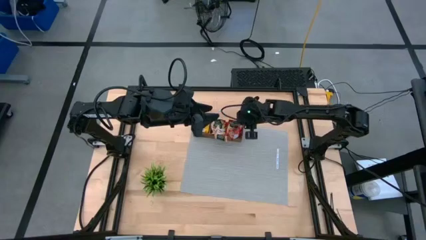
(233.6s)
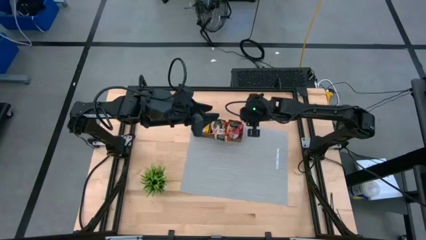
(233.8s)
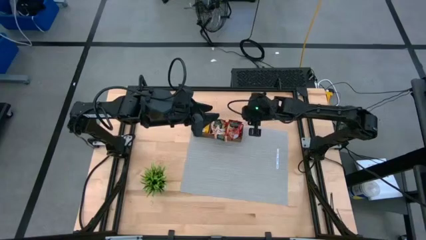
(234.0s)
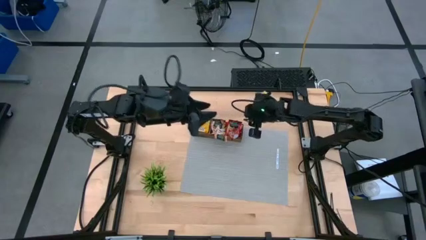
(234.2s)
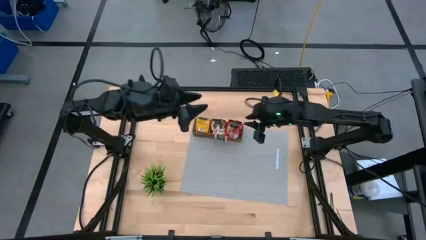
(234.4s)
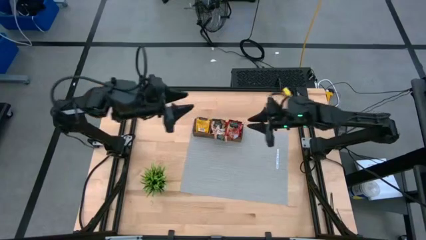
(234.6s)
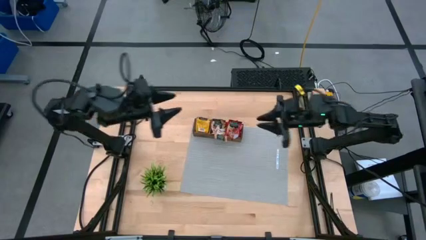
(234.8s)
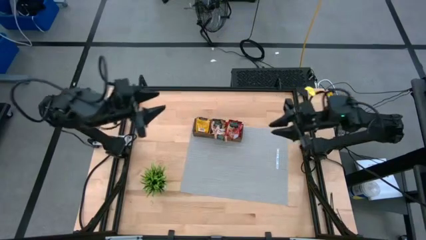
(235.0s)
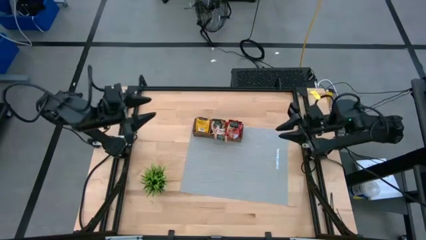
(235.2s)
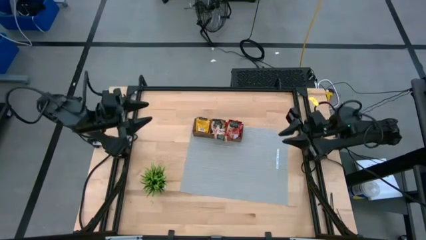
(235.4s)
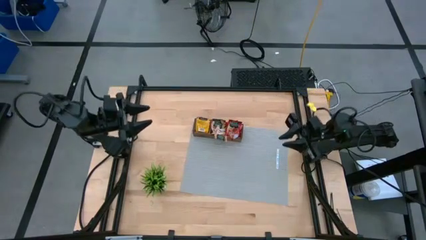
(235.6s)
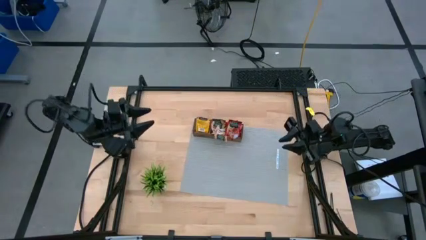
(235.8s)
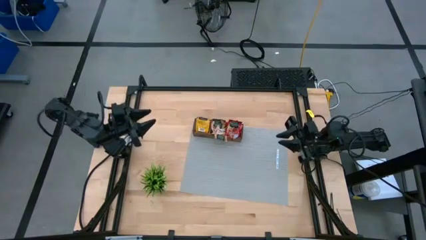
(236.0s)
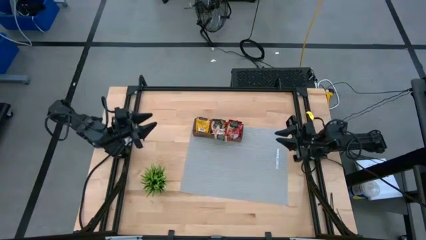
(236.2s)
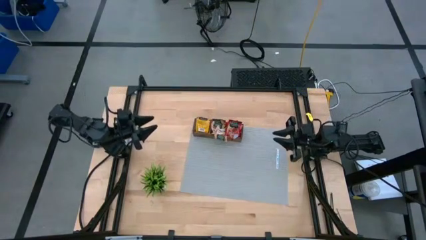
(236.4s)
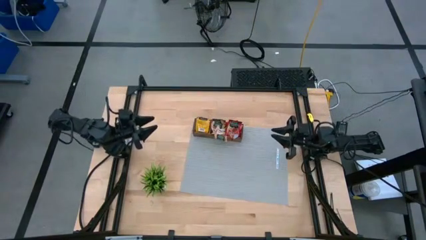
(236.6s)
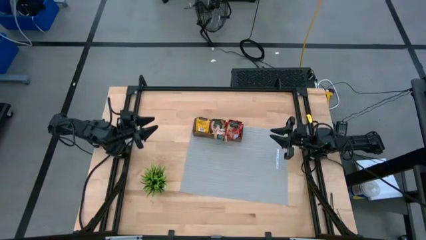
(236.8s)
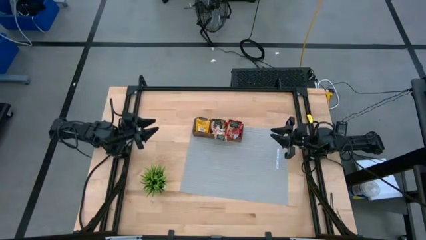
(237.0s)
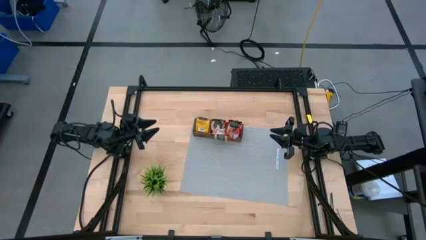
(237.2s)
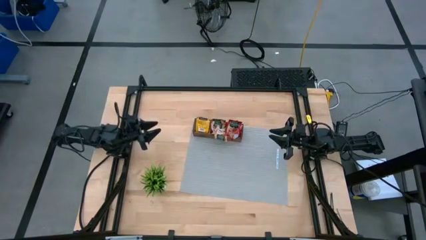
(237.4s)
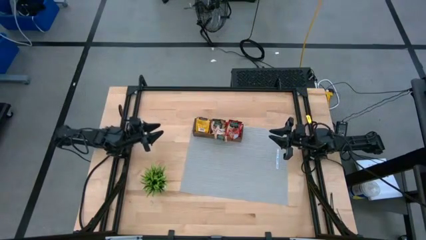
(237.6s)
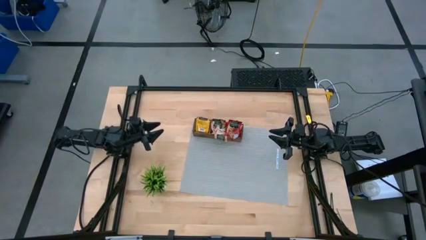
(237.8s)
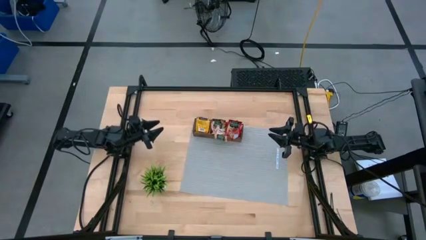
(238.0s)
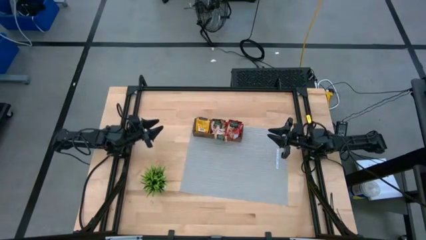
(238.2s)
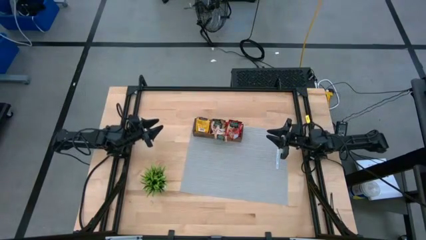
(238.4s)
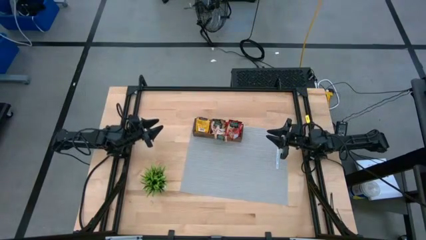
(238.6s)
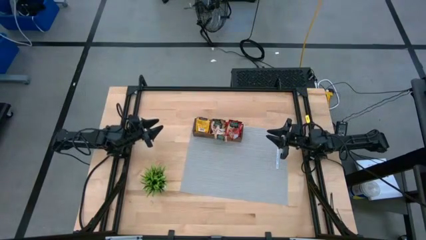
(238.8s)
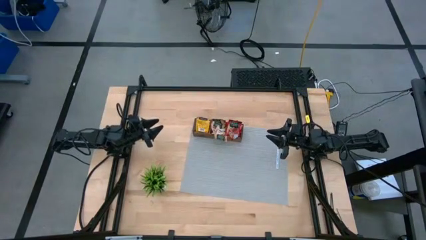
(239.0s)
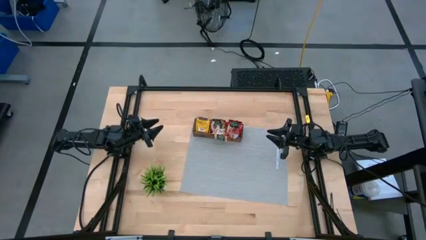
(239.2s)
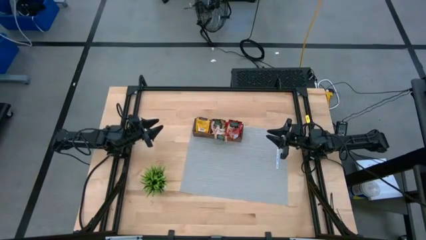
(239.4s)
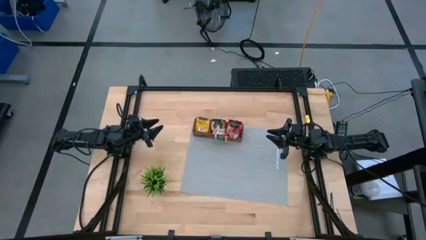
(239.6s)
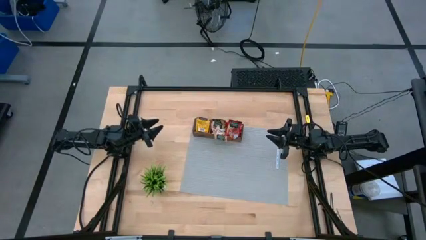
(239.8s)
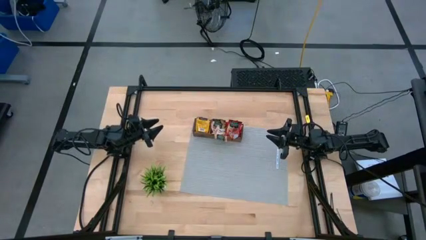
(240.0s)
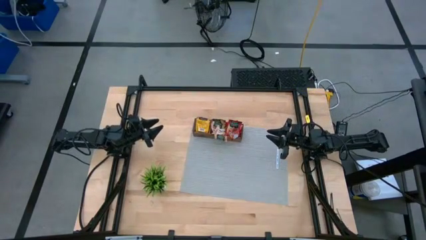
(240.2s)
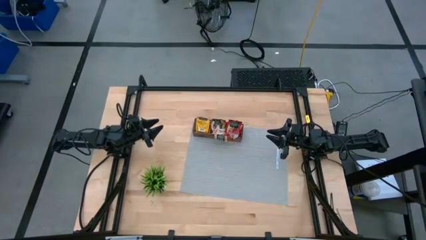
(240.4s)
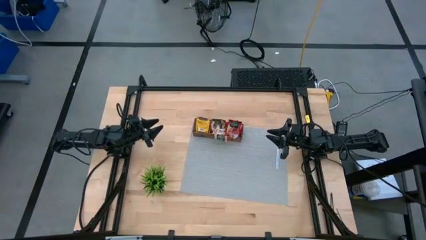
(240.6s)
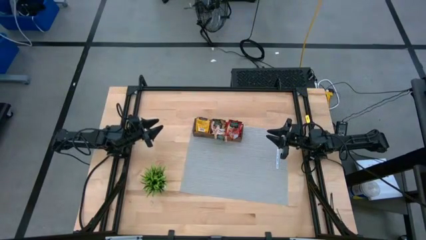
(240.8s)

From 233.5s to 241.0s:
Task: Pick & Place Tea
Return to Home Position

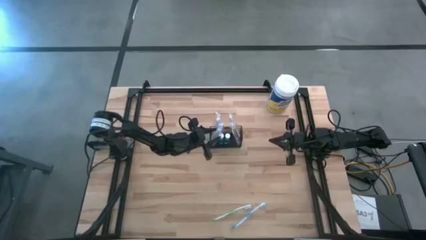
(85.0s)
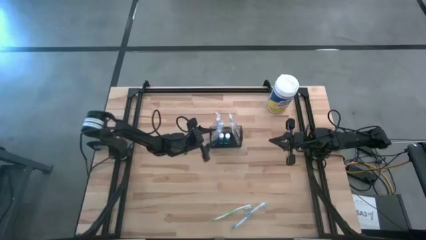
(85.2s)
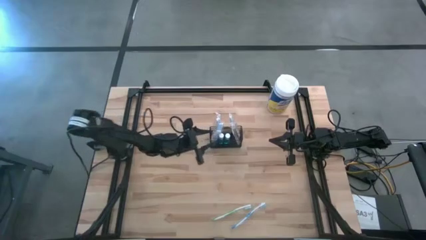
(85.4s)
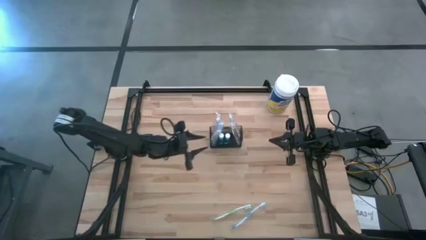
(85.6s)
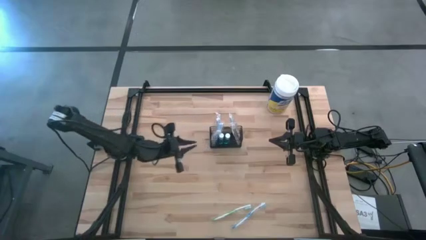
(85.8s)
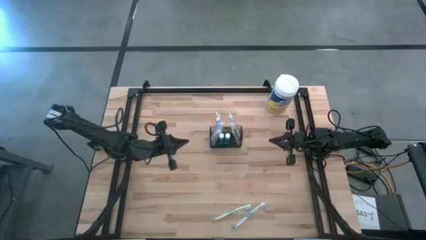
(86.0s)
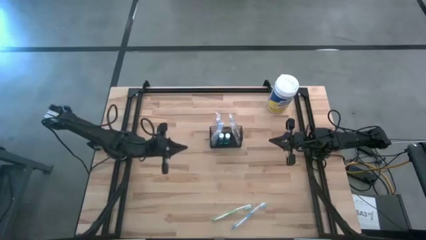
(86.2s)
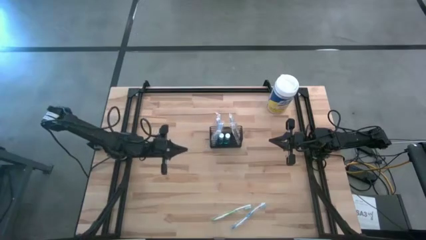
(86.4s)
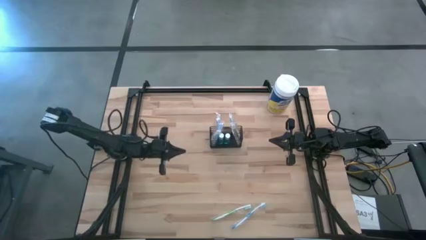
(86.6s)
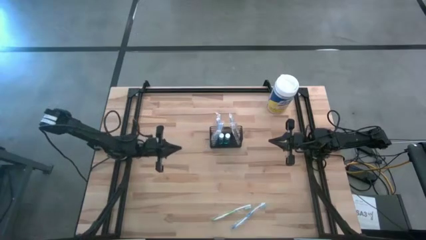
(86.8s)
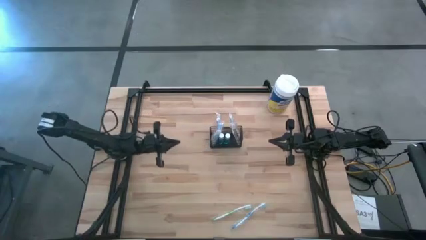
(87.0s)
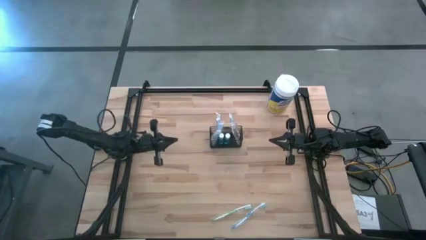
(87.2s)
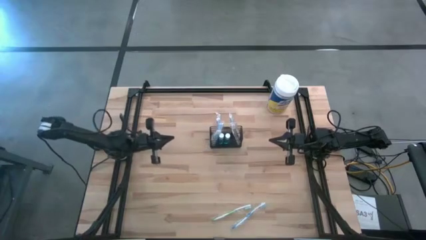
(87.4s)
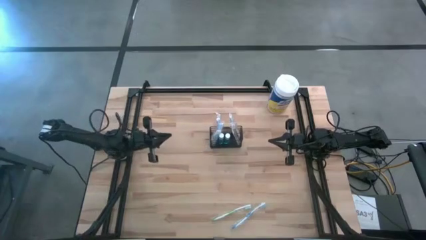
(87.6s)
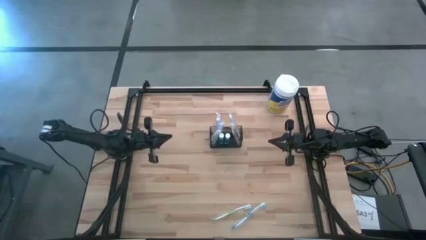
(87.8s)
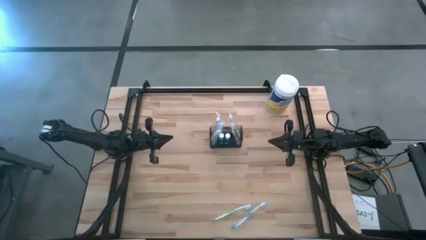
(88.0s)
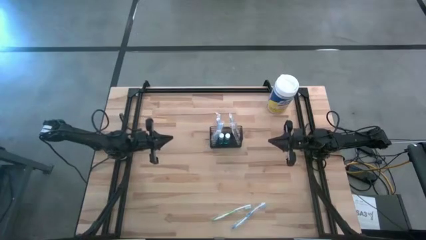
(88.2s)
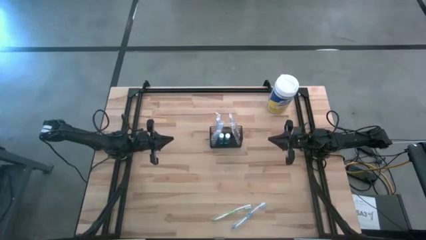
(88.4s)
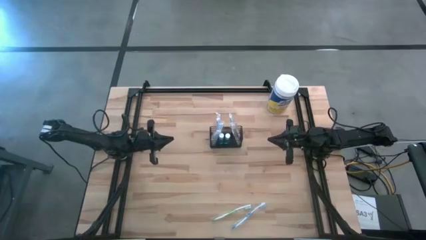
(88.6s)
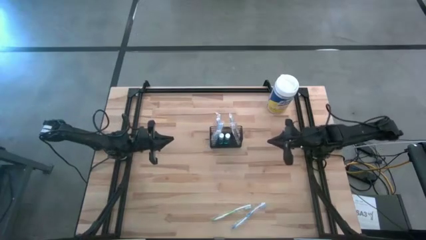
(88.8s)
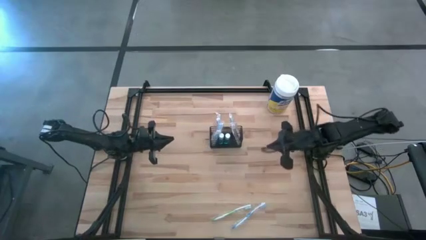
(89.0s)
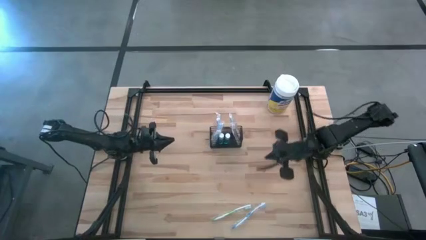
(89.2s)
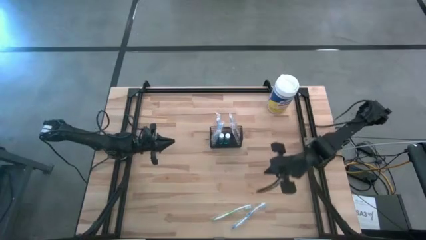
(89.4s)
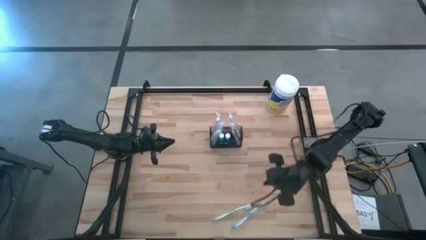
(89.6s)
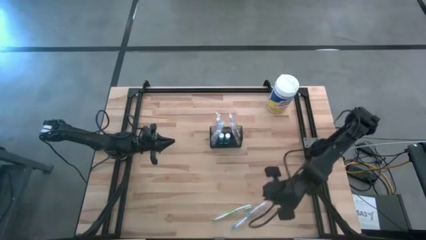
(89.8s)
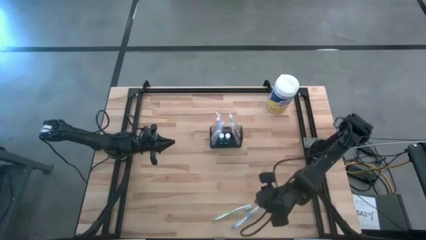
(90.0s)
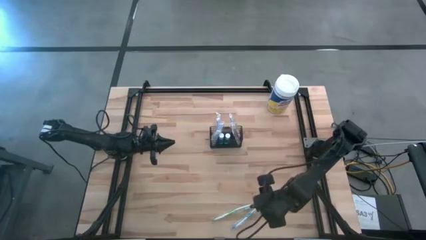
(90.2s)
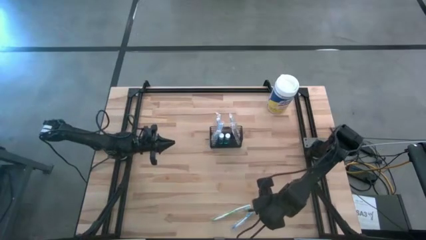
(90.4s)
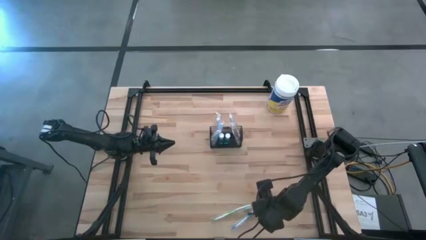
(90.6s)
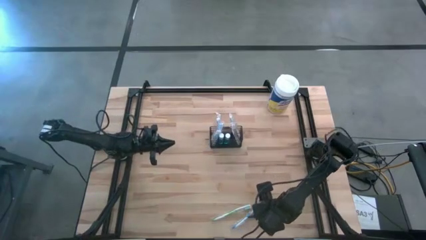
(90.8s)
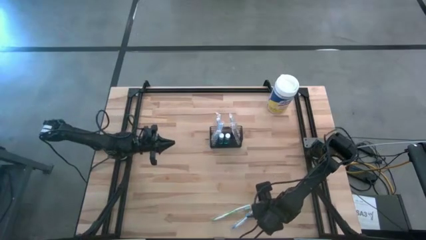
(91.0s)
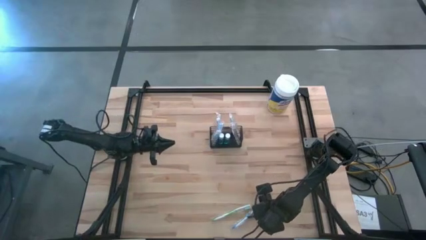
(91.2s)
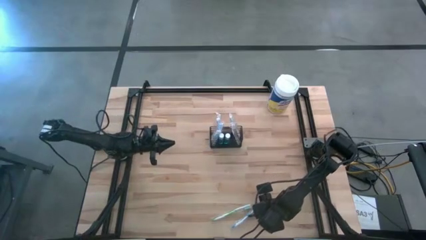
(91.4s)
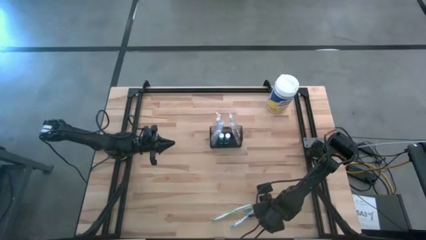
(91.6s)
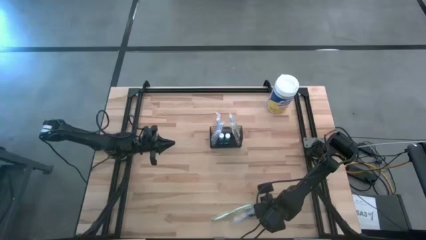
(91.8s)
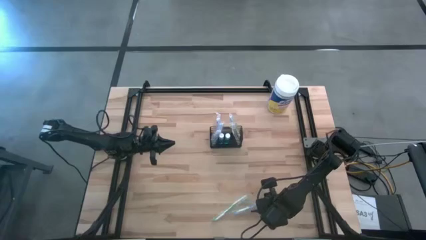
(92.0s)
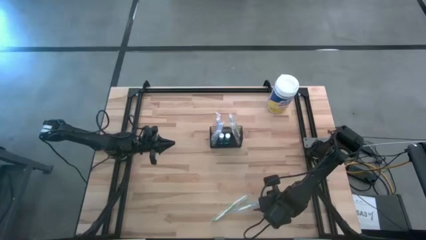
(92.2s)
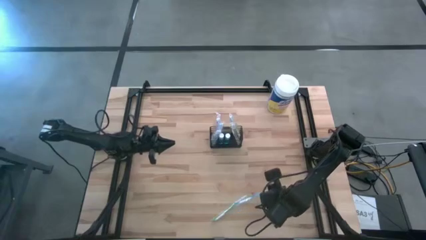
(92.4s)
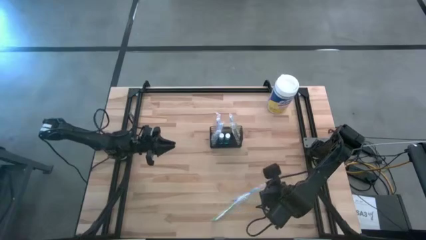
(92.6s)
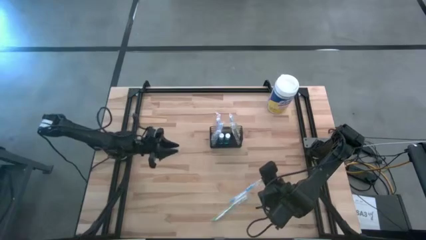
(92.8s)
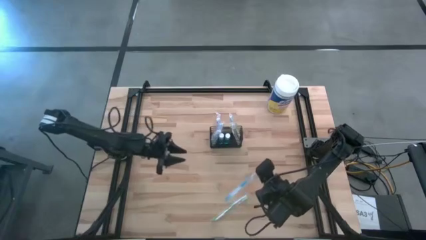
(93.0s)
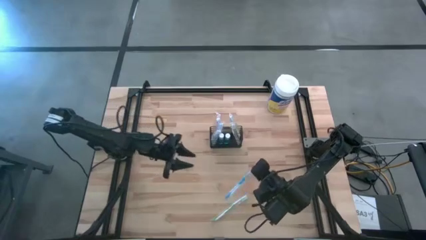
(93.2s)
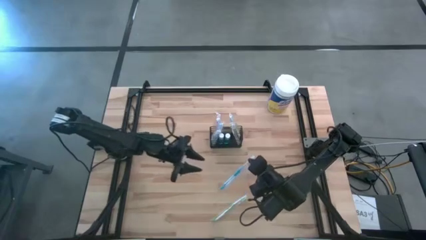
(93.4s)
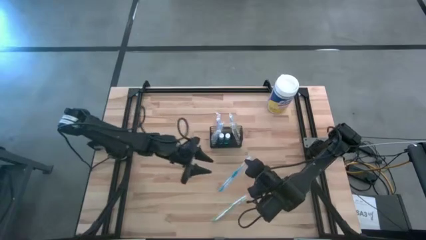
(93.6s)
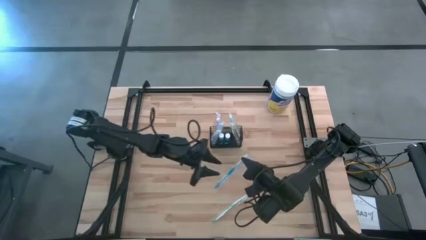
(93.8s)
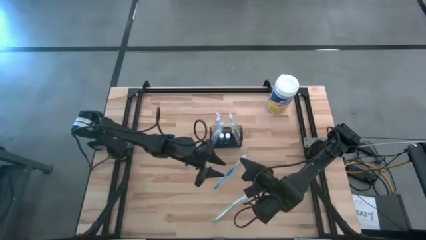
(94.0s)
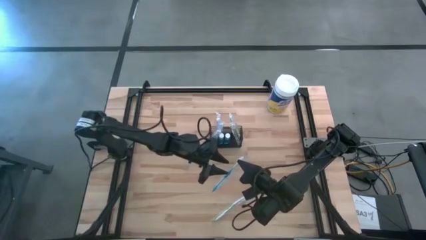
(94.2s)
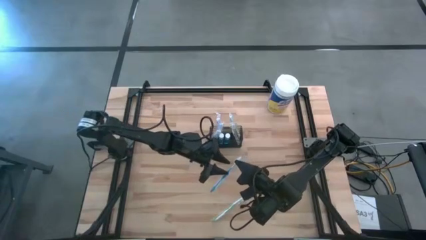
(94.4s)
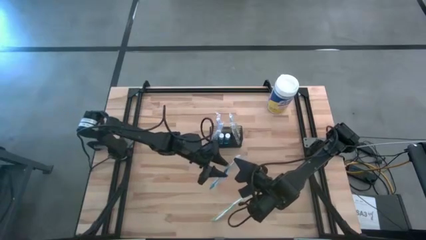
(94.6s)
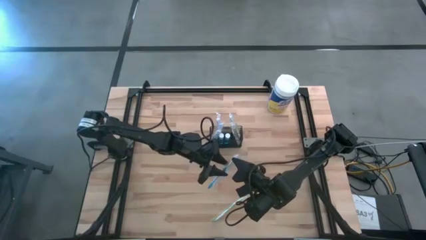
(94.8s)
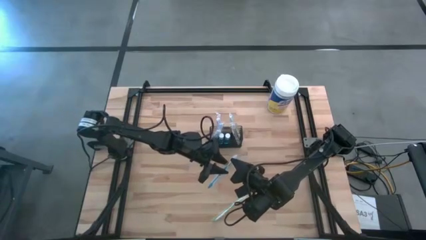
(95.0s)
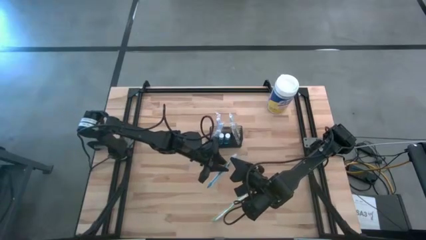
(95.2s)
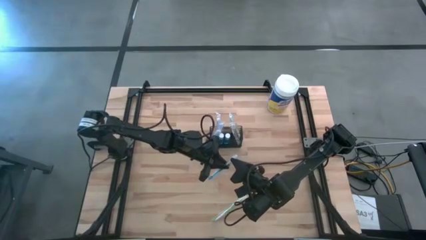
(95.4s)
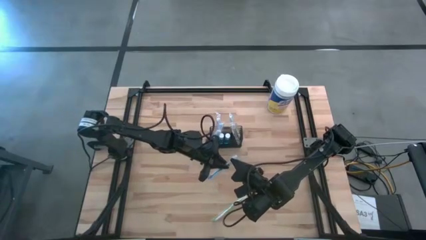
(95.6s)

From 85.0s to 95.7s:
Task: Pick & Place toothbrushing station
Put the blue toothbrush into the black wire organizer
